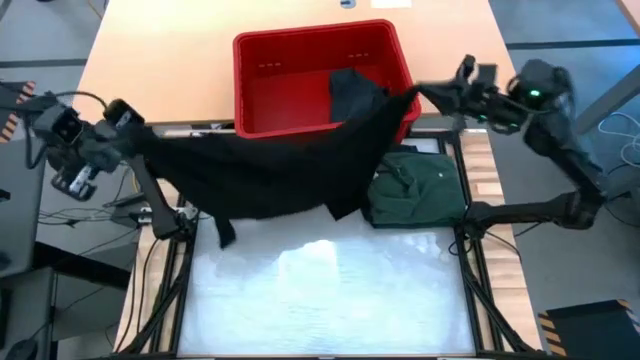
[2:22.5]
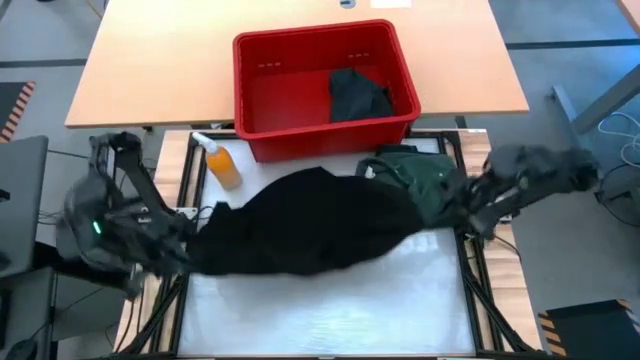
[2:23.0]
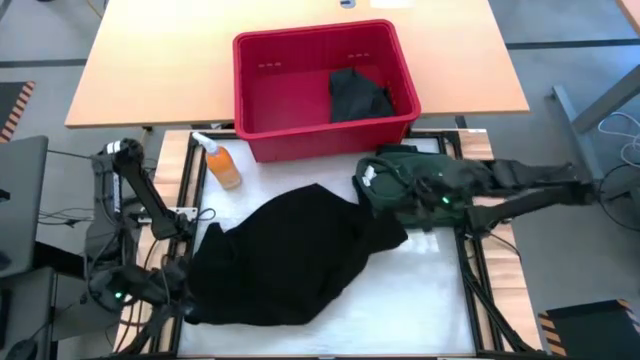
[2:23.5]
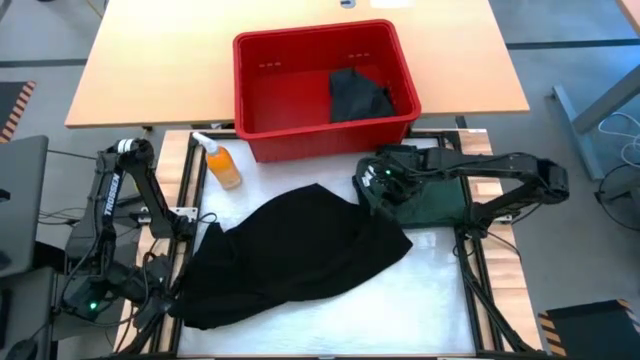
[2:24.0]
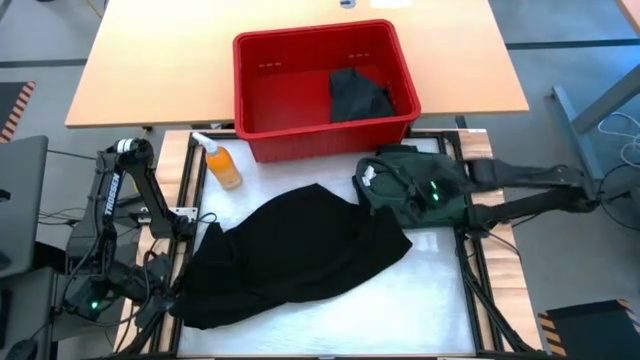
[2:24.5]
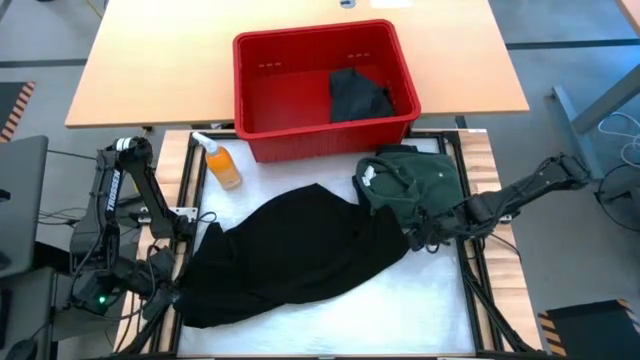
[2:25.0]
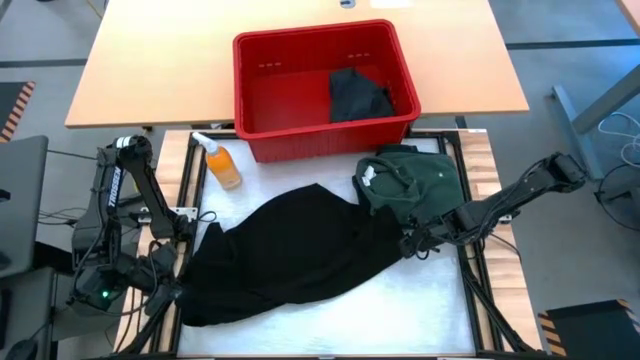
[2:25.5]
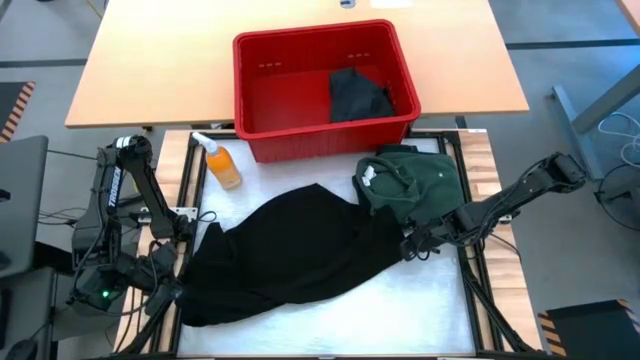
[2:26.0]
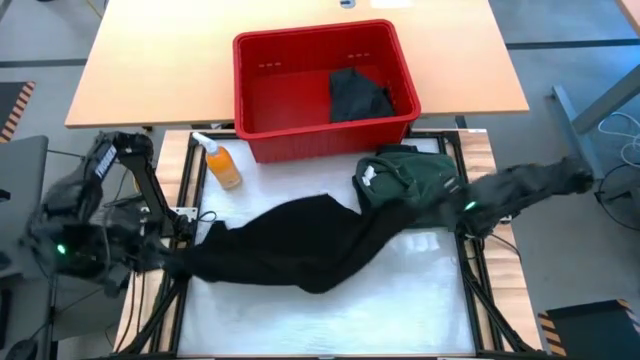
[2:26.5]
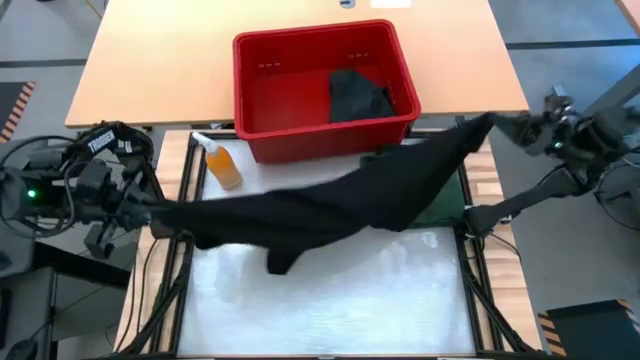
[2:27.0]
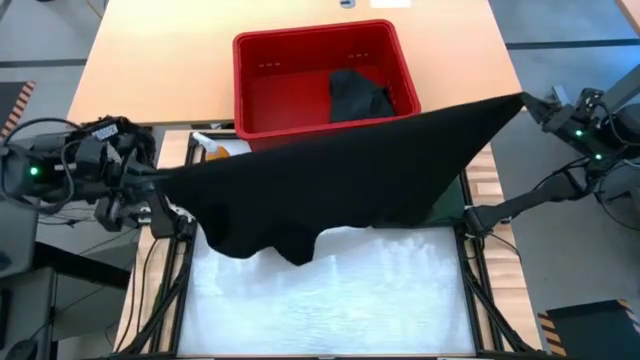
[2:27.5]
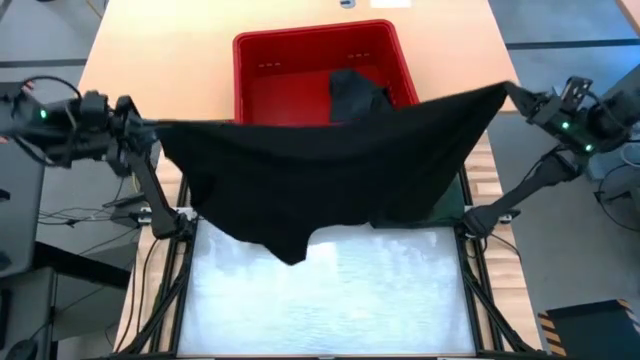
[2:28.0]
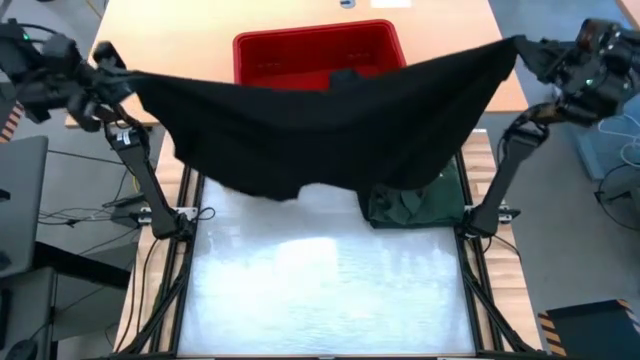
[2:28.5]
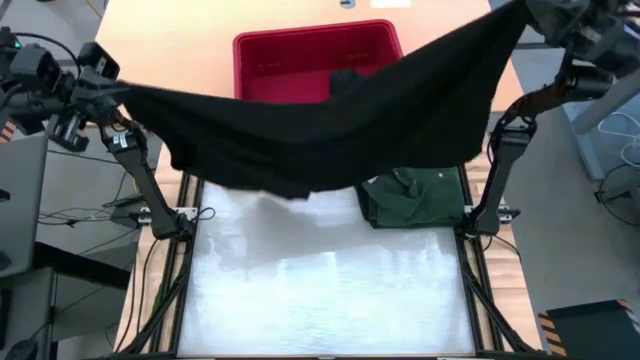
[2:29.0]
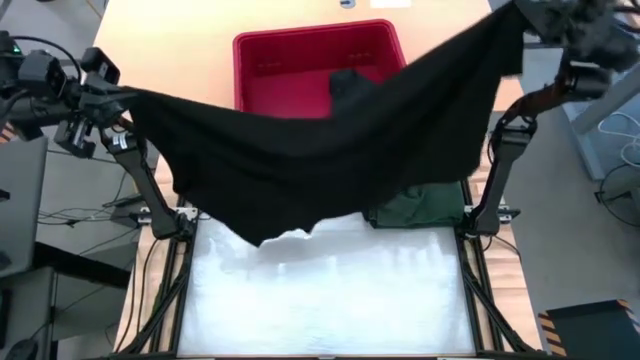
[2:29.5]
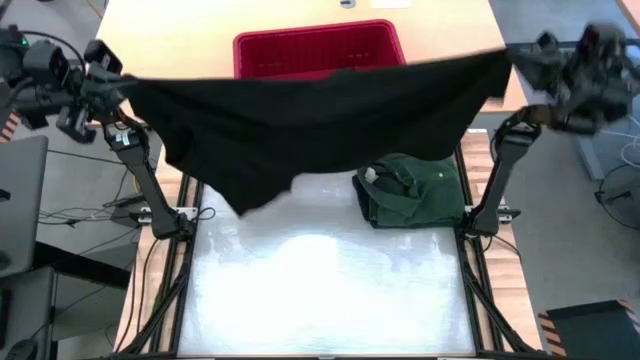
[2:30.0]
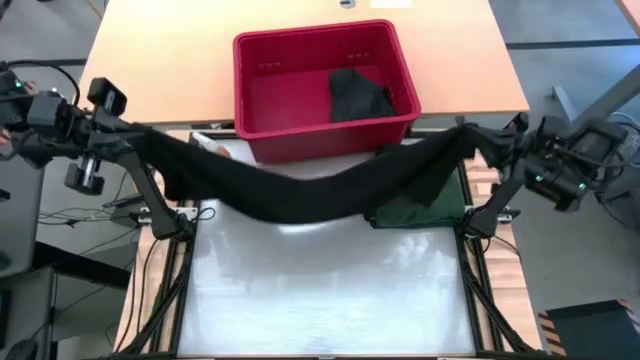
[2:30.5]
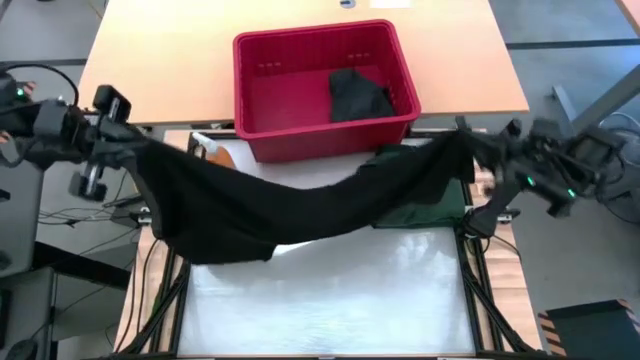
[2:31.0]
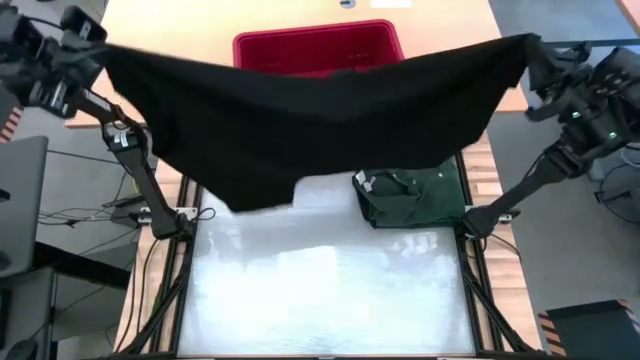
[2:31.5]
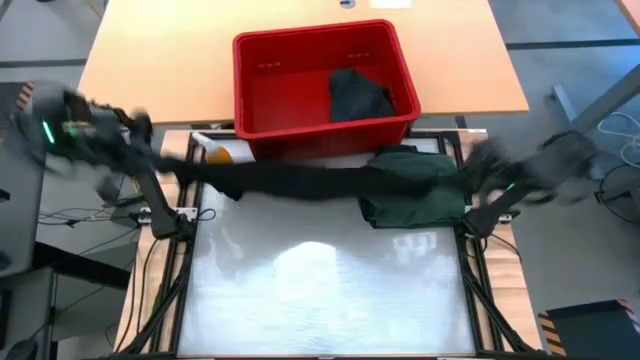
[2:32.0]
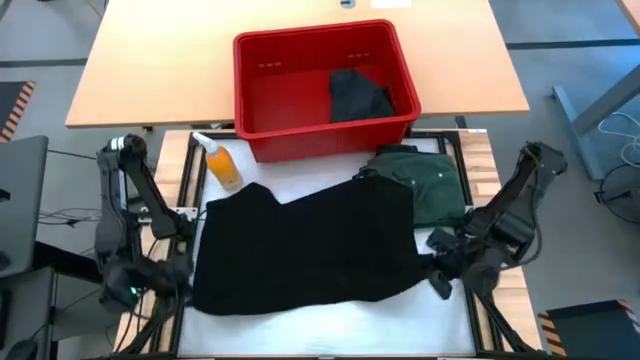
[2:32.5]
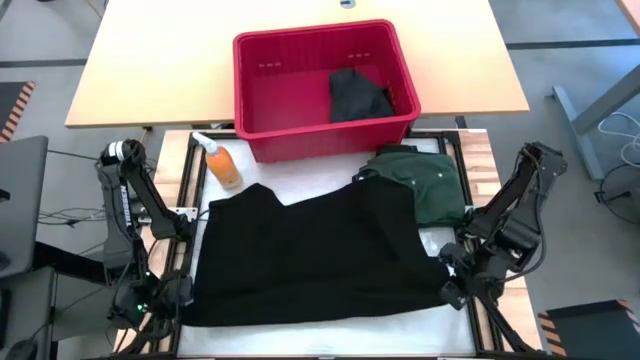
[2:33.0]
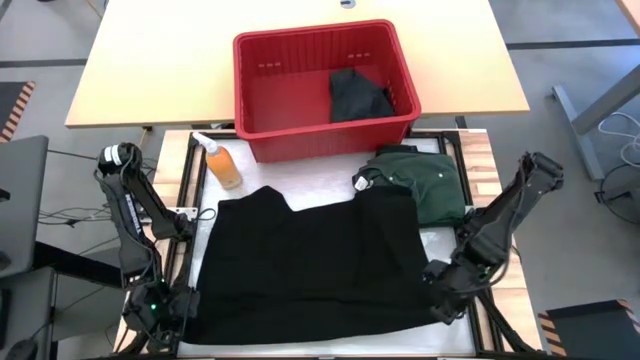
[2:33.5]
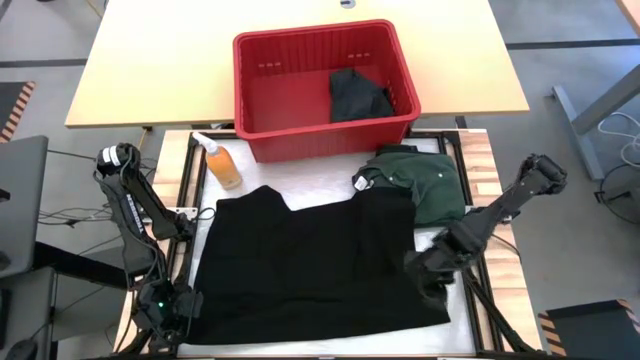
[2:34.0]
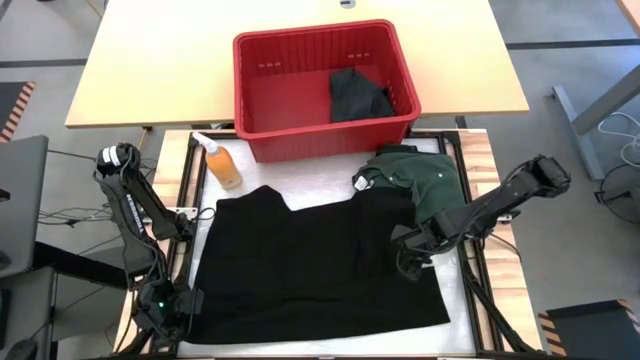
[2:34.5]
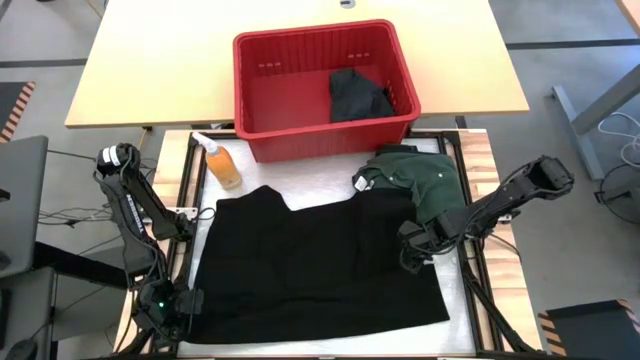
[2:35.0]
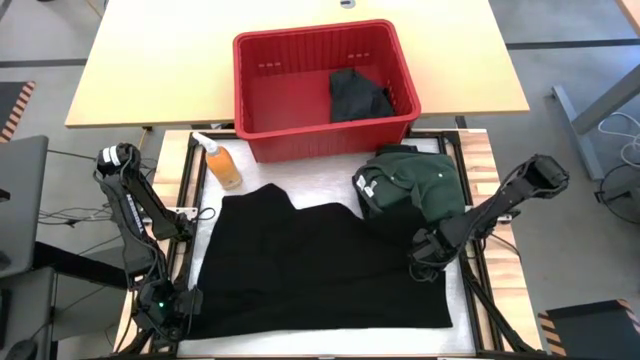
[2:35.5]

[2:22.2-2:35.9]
Task: Fold laundry
Fold the black shirt

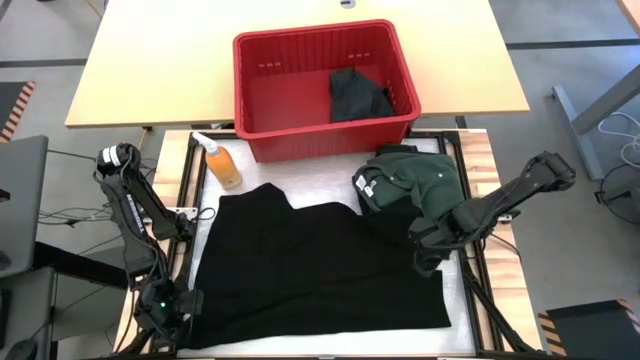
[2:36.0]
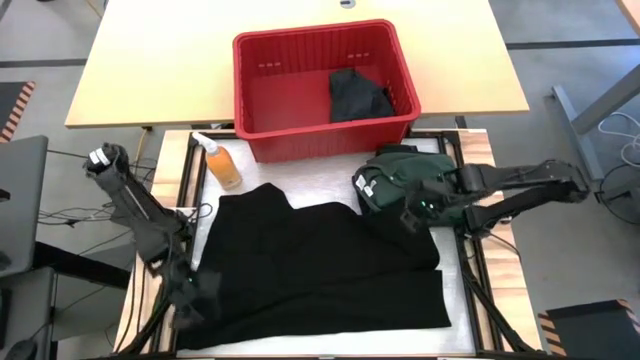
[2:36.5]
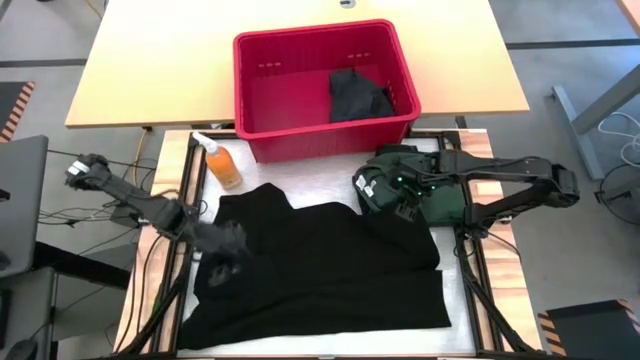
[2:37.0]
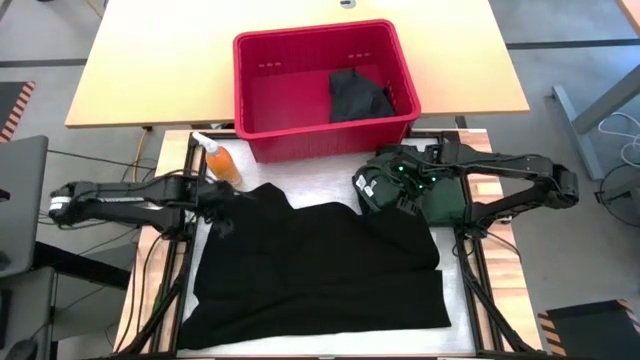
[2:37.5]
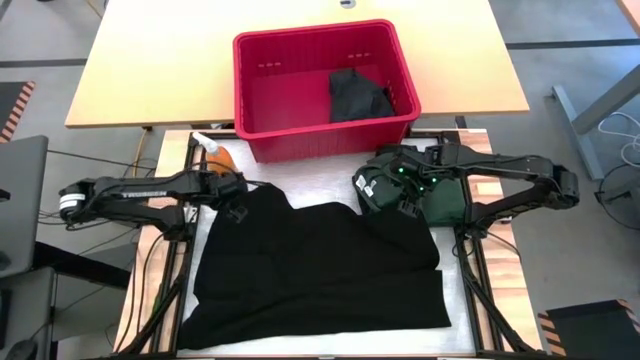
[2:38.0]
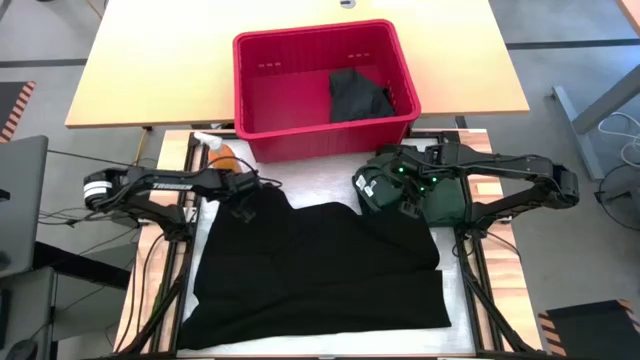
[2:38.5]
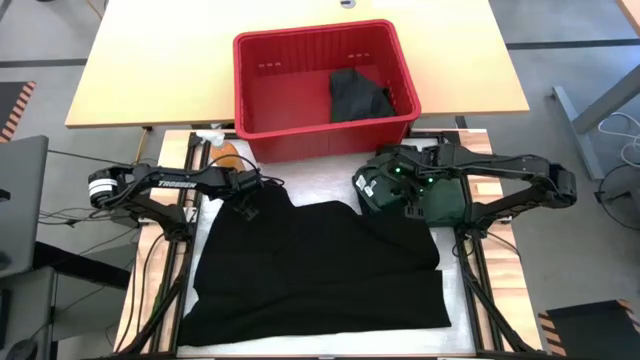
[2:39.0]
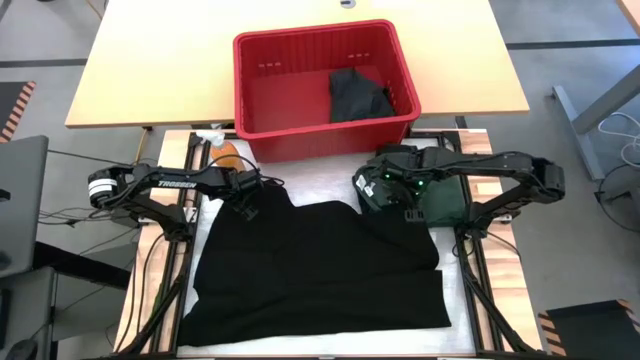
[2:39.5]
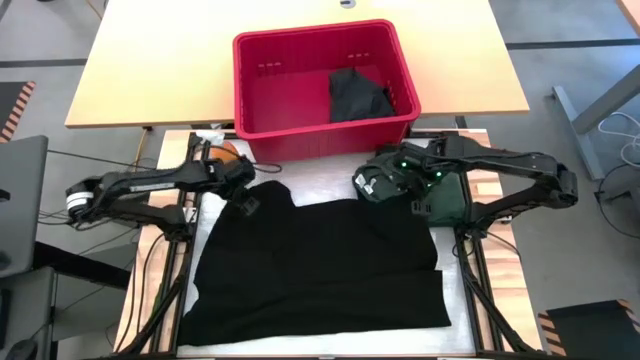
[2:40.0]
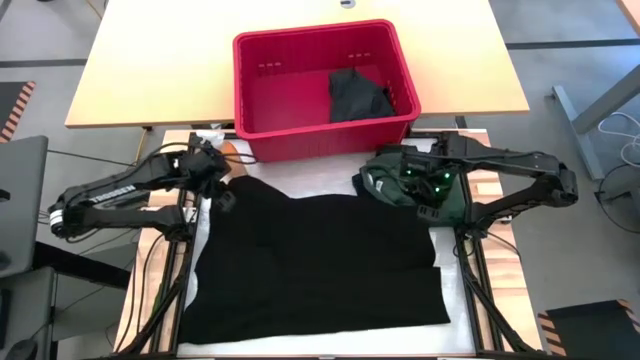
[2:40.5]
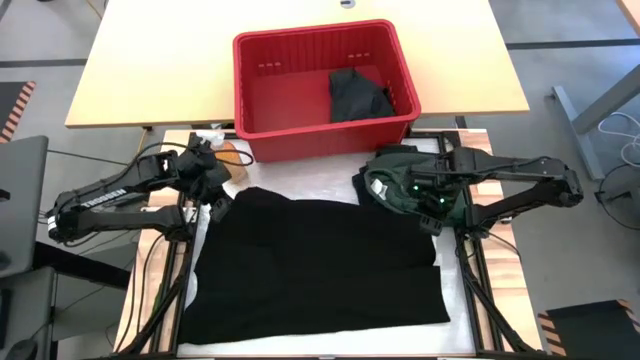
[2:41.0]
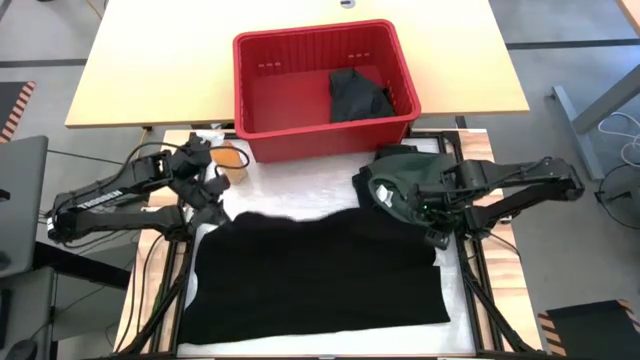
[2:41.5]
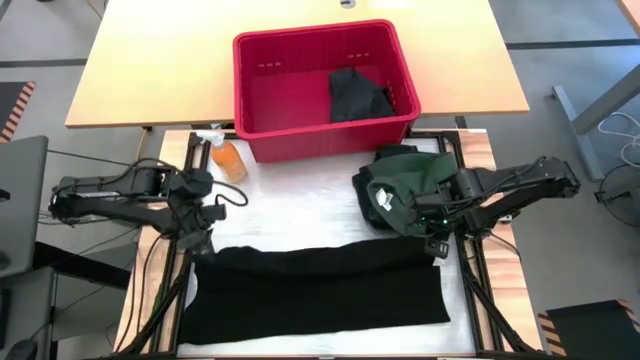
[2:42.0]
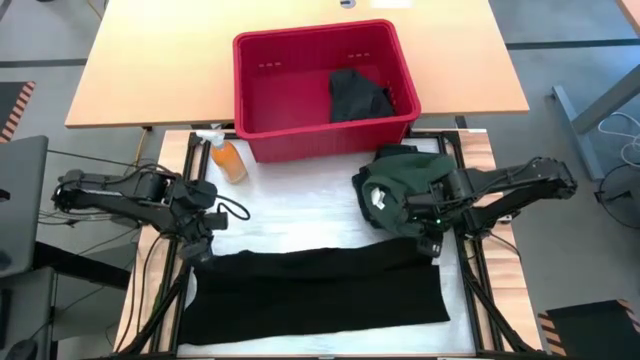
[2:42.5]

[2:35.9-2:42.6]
Fold the black shirt
